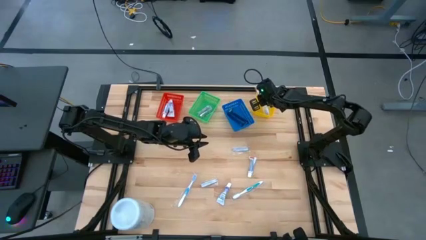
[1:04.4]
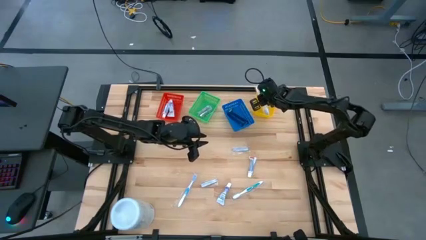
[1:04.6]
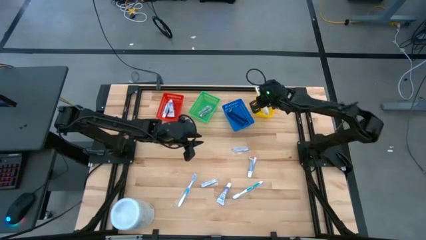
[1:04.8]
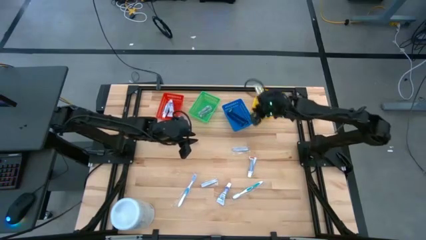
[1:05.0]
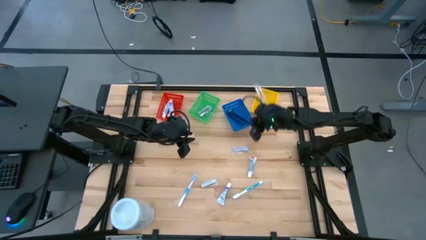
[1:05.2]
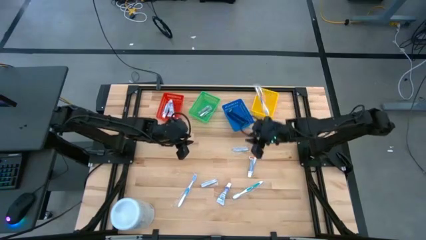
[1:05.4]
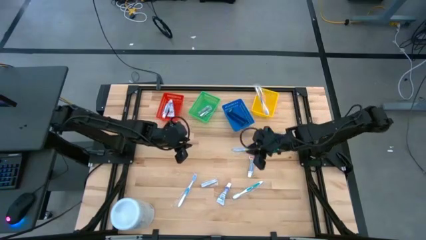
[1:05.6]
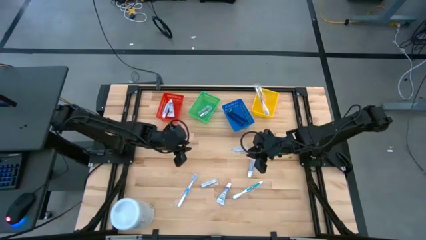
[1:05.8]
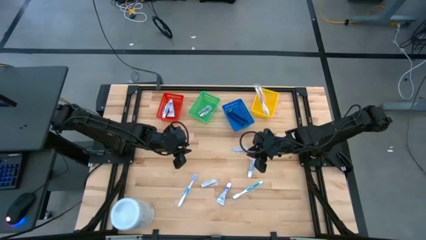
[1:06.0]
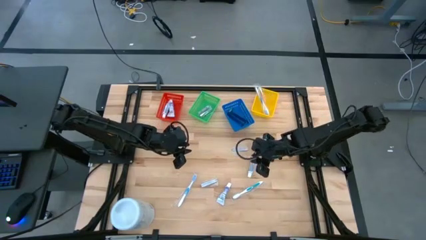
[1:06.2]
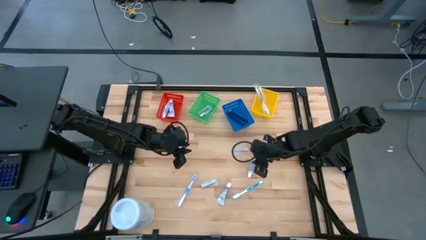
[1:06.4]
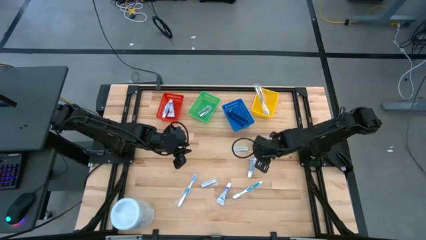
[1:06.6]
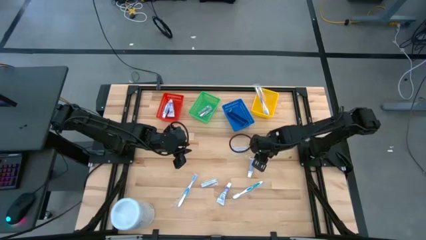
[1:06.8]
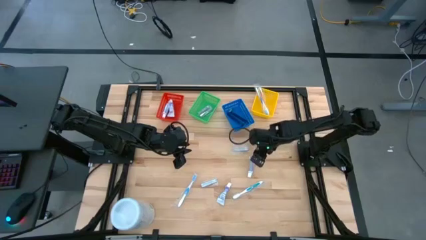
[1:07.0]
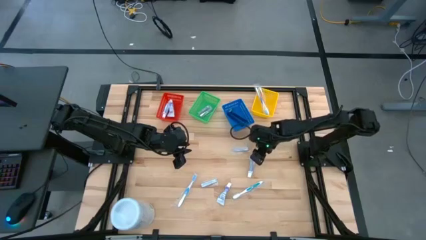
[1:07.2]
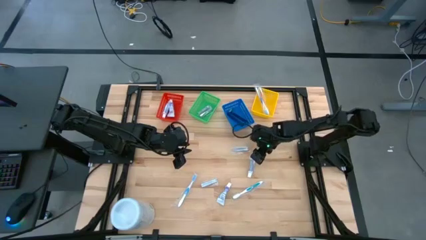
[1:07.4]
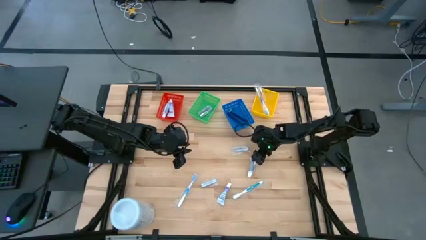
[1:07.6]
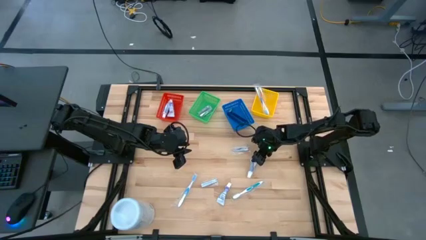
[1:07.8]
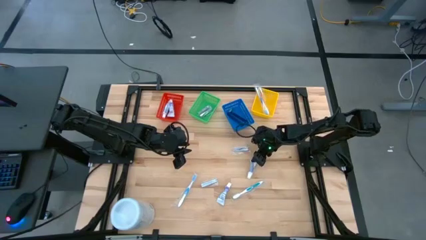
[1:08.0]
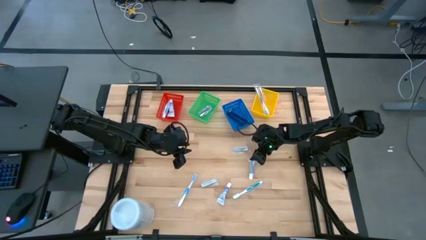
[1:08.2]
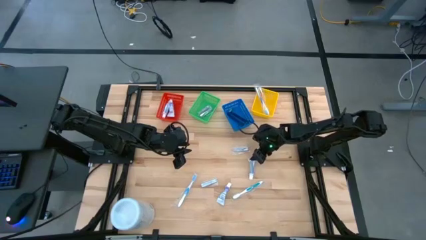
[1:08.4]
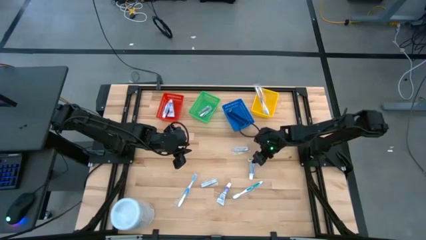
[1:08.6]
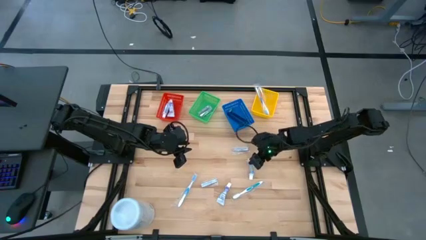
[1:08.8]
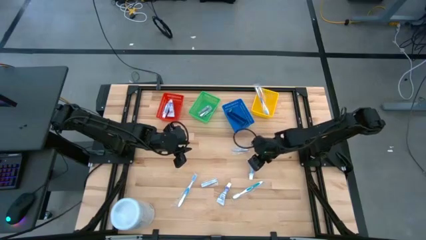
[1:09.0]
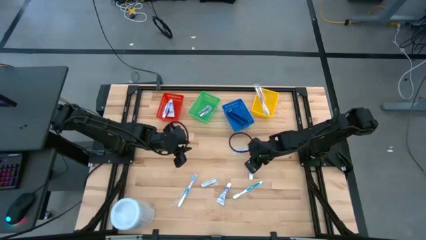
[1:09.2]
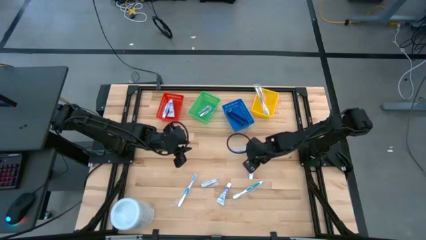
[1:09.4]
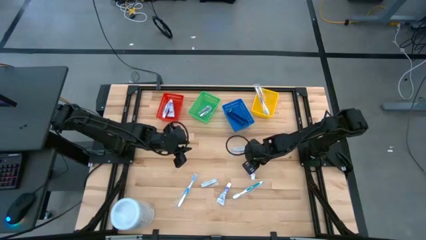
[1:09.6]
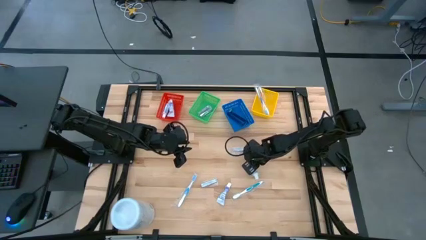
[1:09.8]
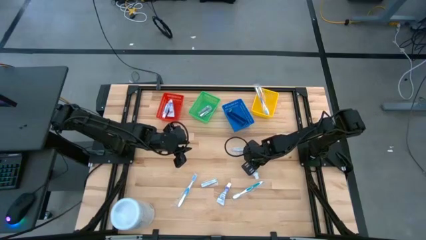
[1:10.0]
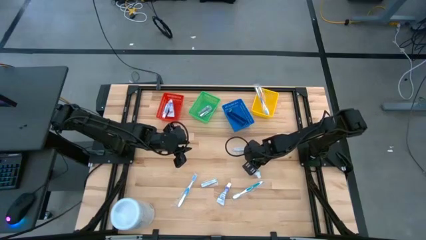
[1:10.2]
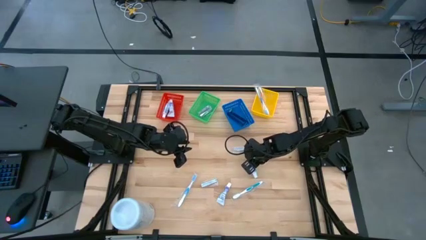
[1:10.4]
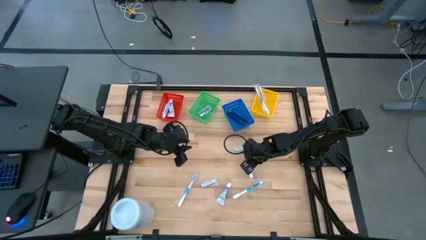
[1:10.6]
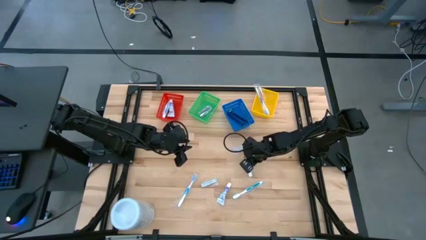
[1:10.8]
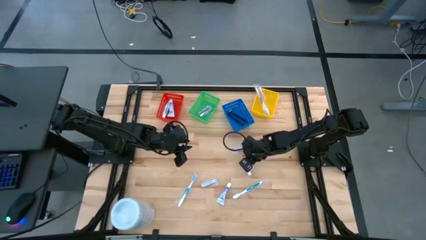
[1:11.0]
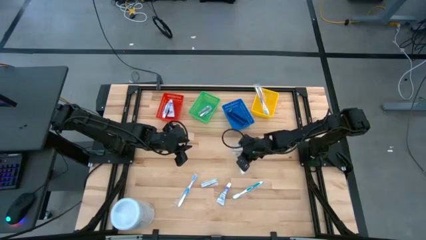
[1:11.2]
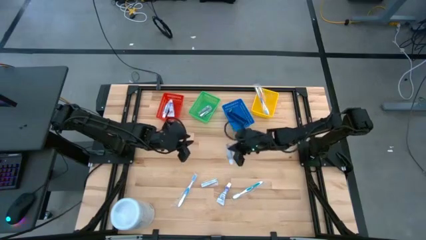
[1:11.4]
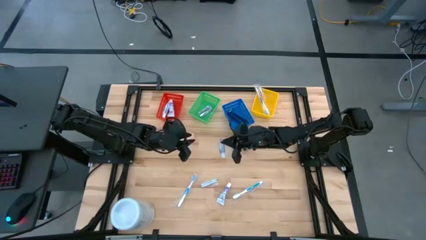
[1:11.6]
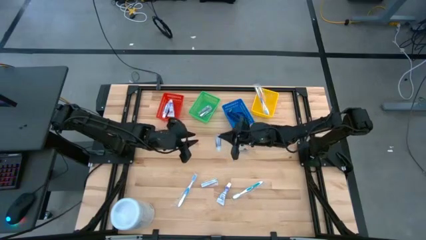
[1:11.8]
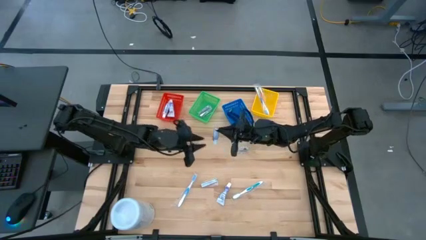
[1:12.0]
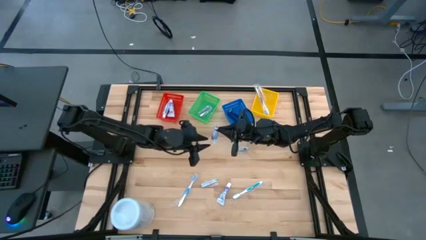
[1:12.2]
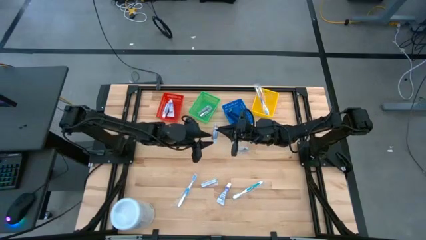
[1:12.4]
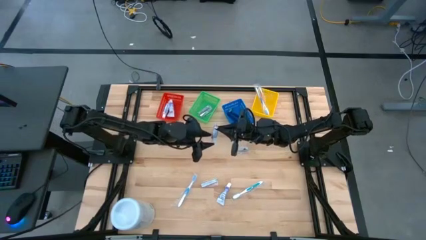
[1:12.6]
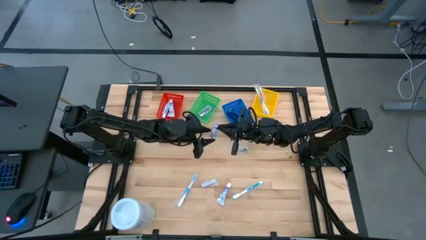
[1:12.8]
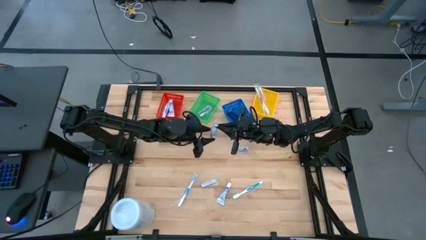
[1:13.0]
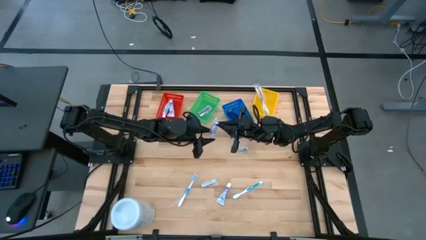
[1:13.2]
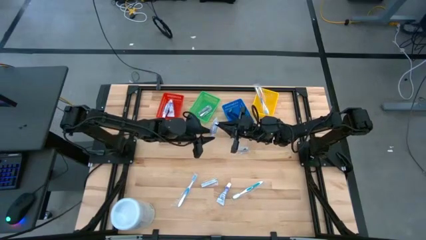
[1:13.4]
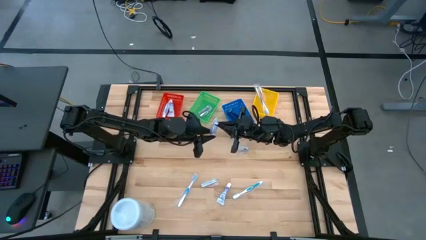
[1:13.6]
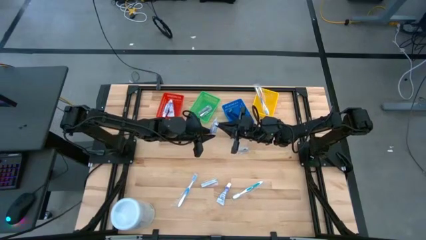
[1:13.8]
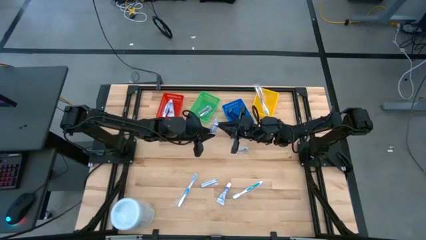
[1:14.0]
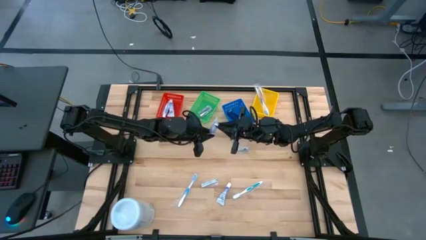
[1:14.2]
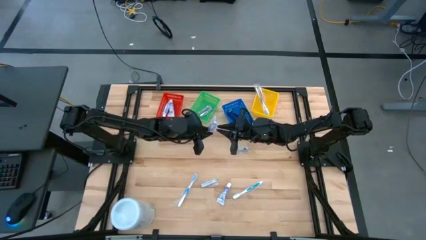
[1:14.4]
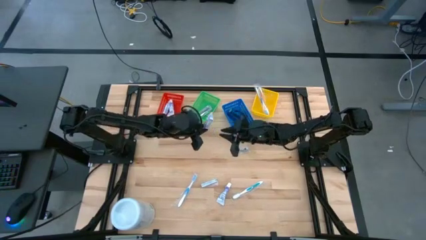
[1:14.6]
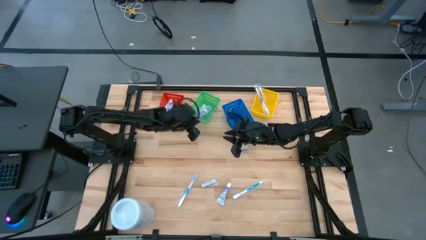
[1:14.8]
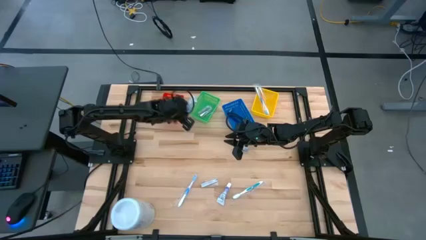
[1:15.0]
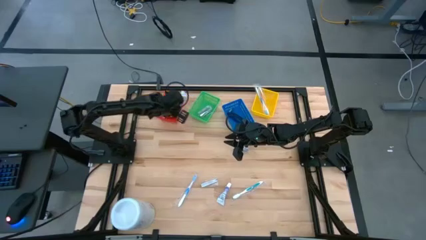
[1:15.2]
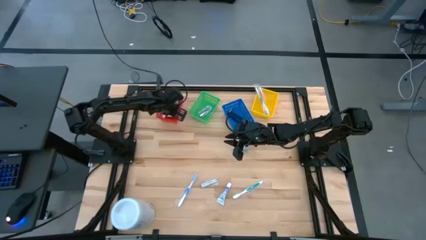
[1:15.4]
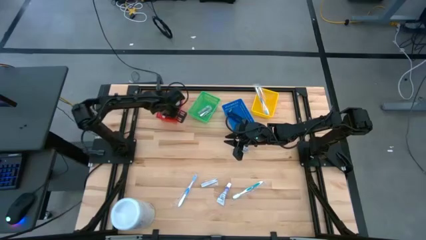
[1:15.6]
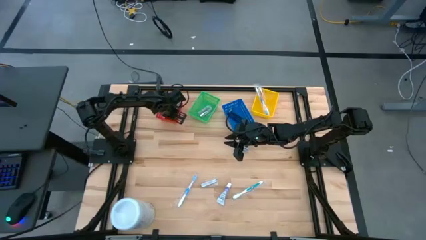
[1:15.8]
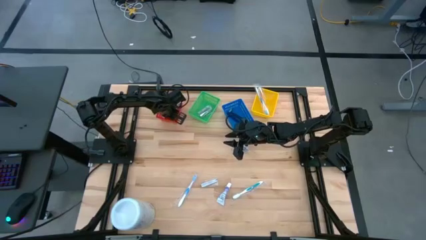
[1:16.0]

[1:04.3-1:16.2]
Task: Pick & Place Travel size toiletries
Put the white toothpaste in the red bin

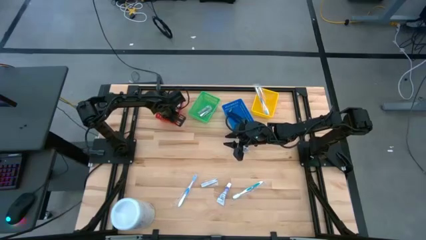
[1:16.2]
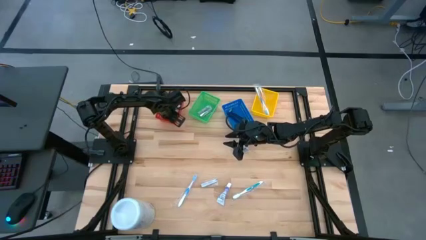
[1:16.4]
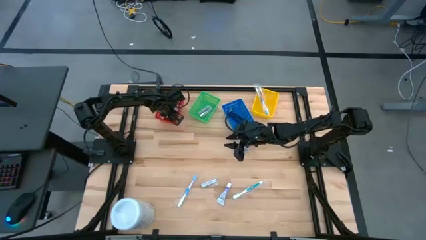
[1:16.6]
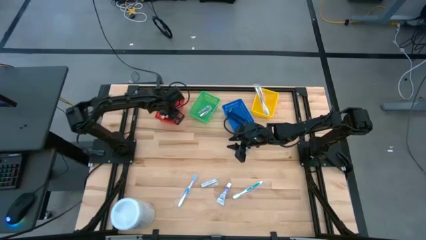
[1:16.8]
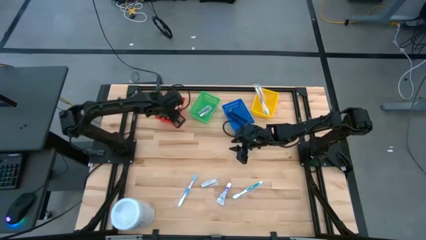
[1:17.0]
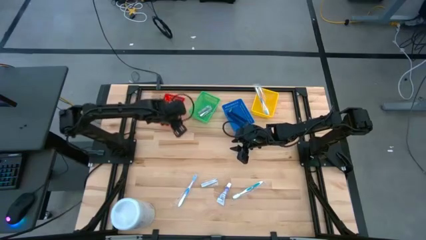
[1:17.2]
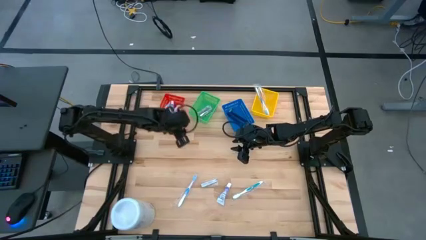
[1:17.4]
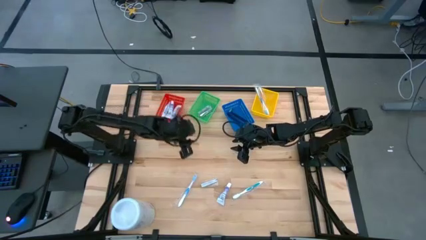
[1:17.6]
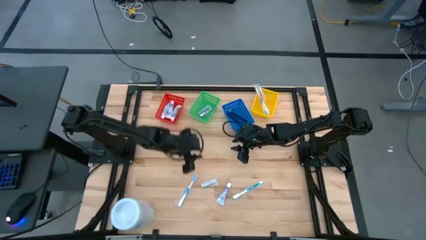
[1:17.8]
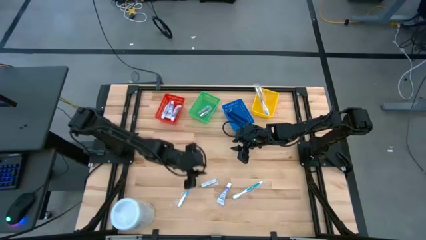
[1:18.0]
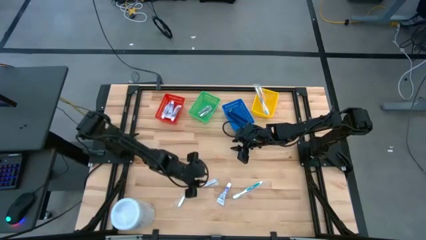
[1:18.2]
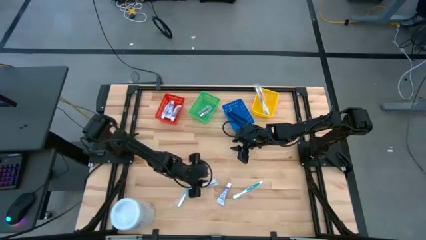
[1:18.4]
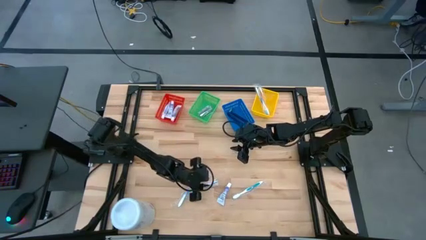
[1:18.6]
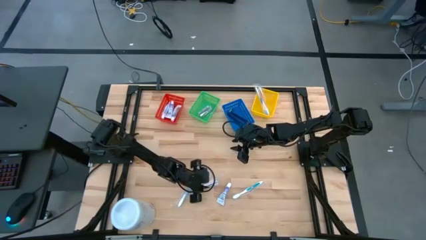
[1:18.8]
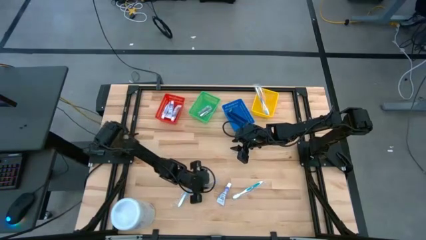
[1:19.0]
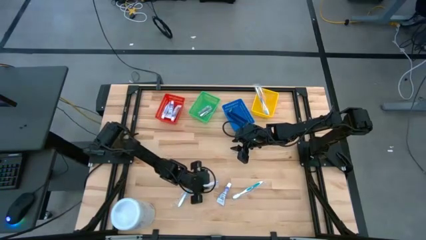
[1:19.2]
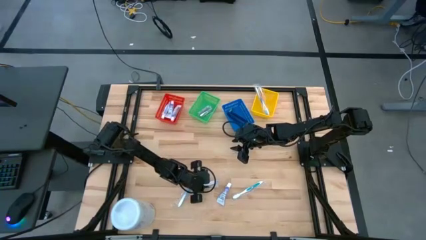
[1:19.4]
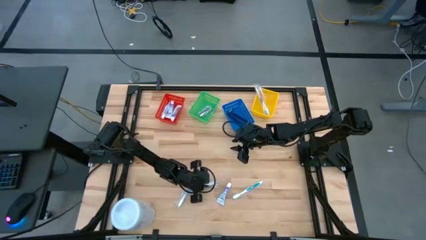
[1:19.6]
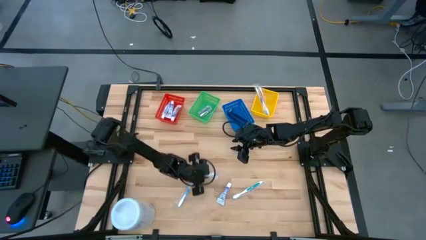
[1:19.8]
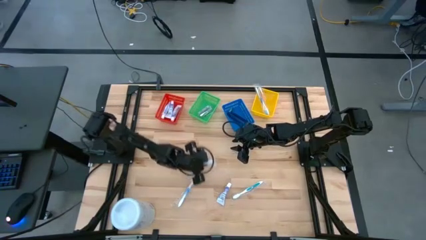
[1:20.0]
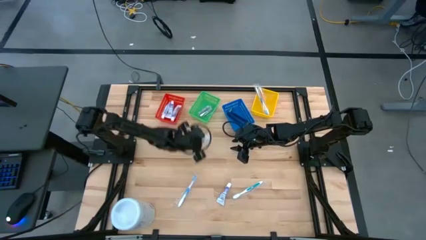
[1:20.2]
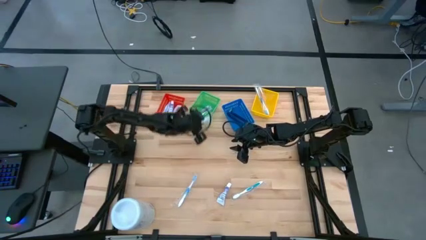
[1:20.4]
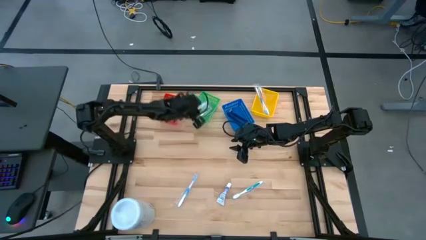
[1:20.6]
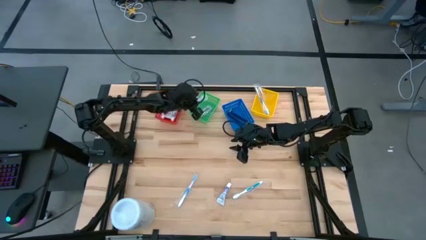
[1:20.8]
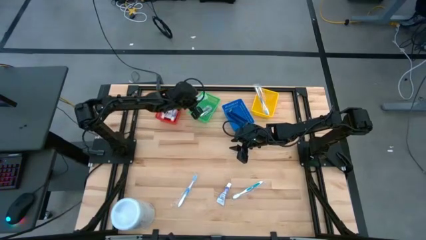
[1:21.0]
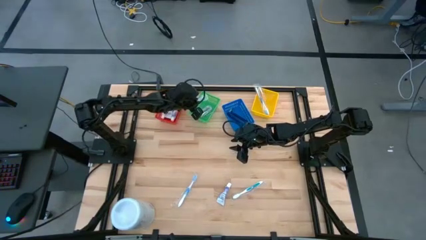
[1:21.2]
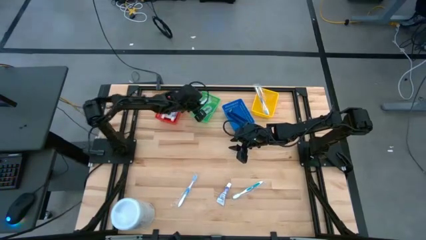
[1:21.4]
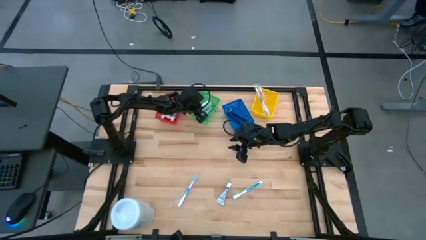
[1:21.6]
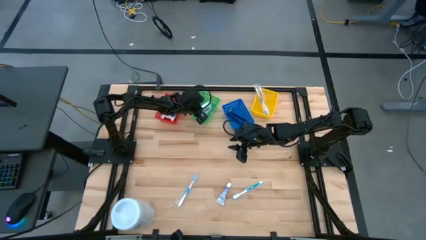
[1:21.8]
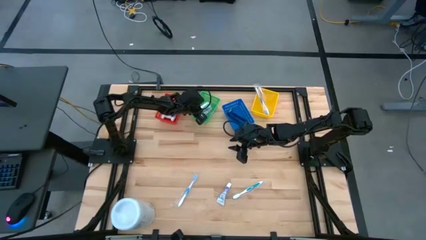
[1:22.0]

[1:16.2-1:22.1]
Put the silver nail cutter in the green bin
